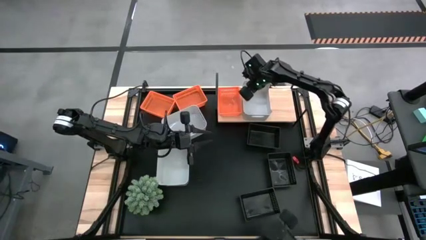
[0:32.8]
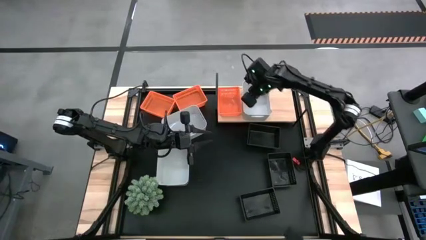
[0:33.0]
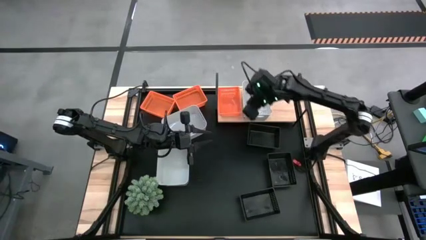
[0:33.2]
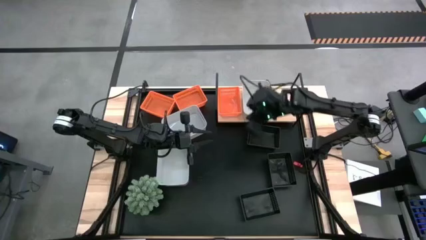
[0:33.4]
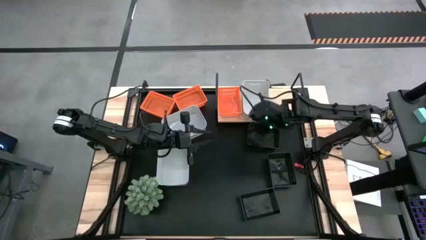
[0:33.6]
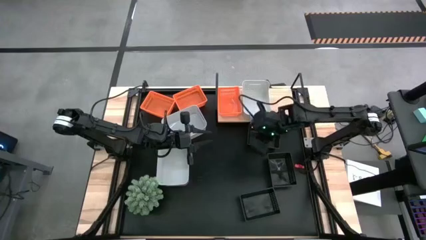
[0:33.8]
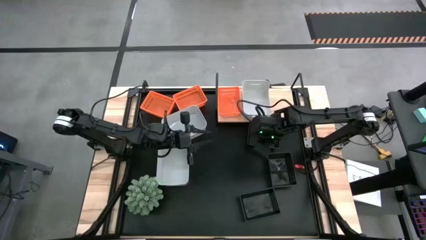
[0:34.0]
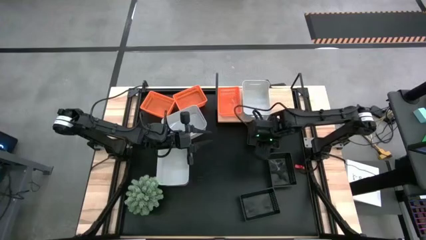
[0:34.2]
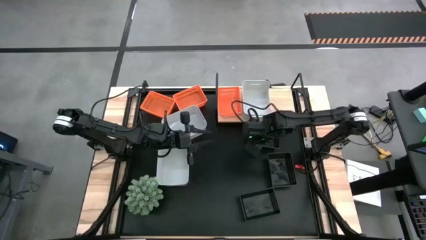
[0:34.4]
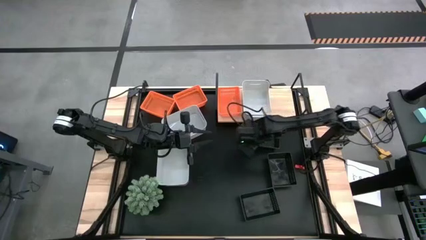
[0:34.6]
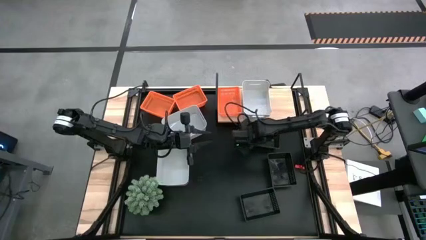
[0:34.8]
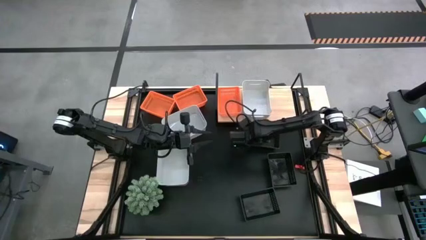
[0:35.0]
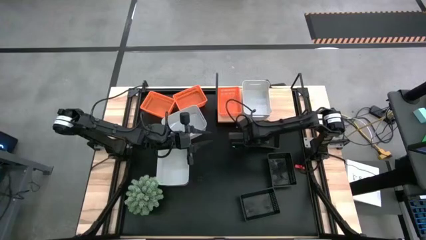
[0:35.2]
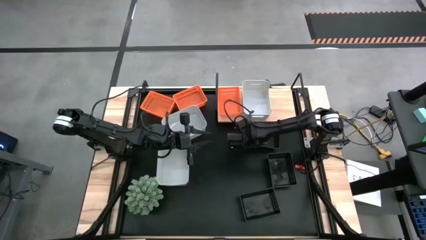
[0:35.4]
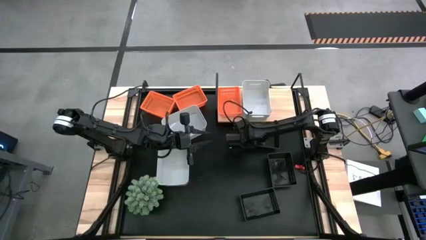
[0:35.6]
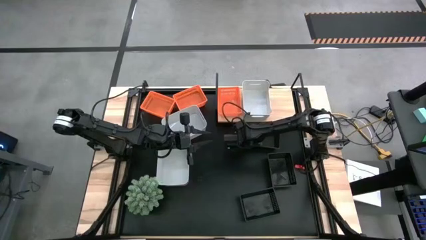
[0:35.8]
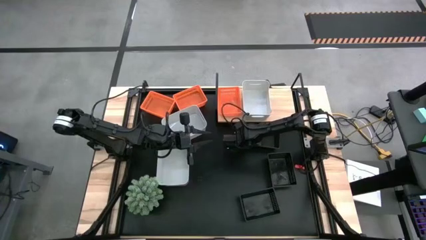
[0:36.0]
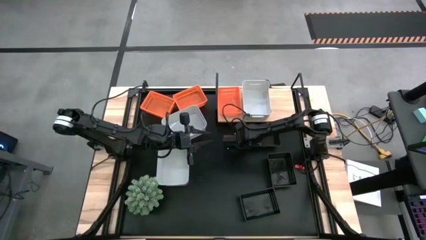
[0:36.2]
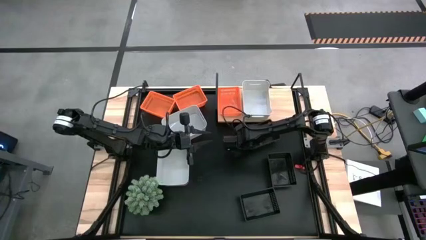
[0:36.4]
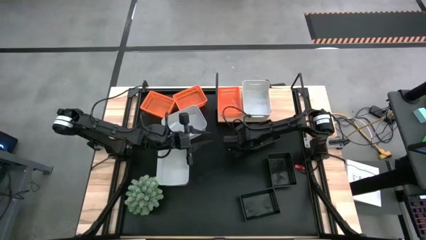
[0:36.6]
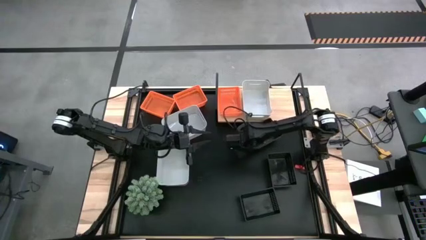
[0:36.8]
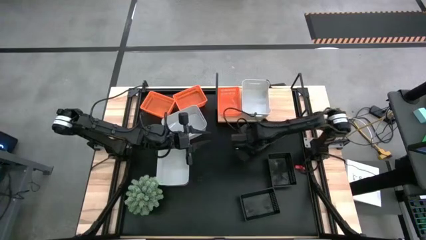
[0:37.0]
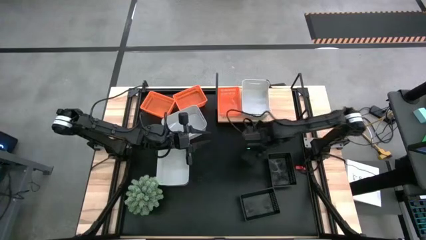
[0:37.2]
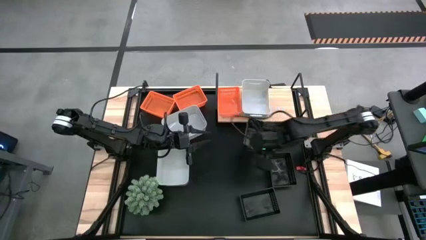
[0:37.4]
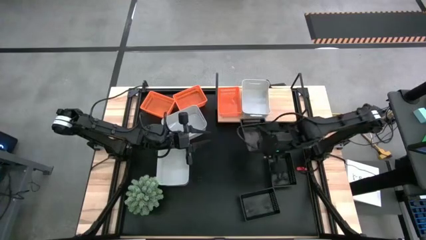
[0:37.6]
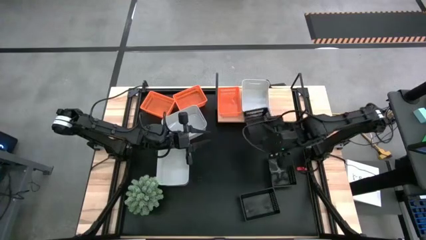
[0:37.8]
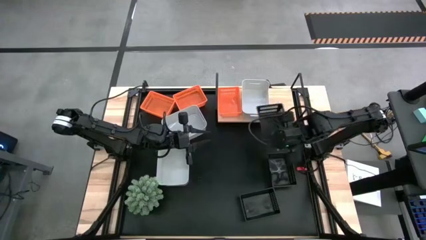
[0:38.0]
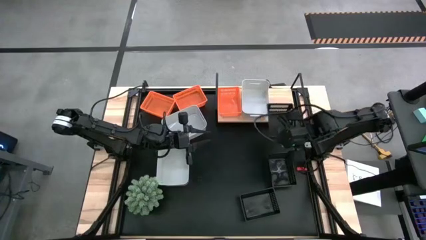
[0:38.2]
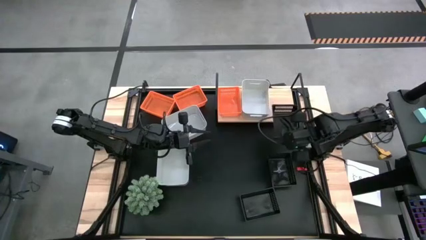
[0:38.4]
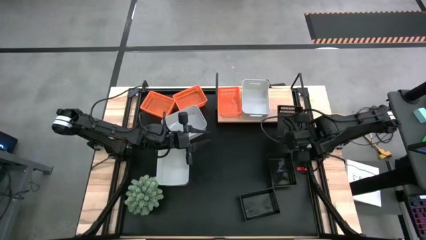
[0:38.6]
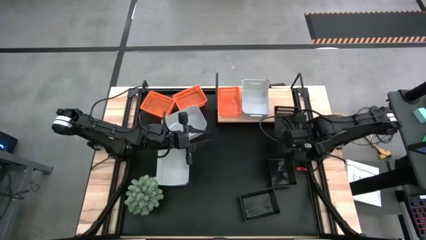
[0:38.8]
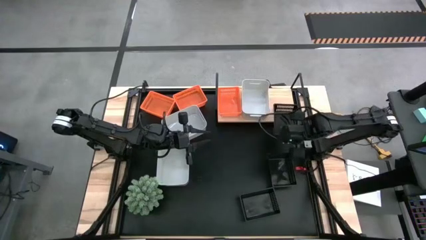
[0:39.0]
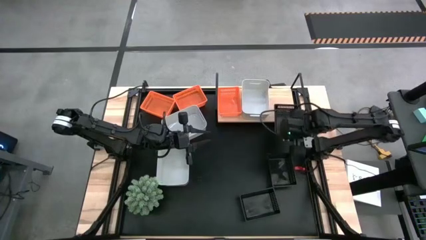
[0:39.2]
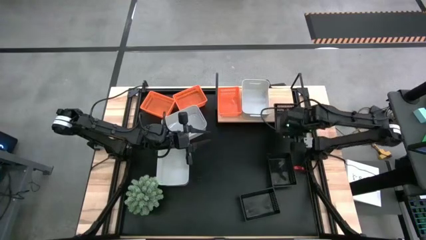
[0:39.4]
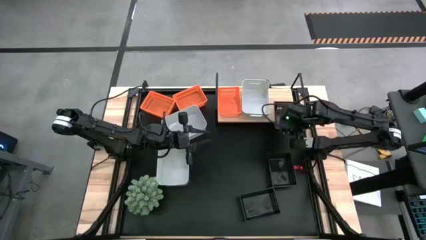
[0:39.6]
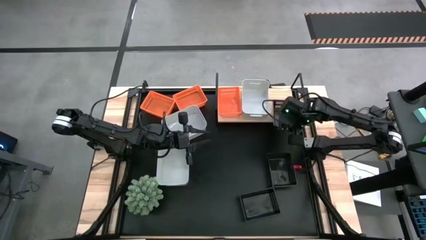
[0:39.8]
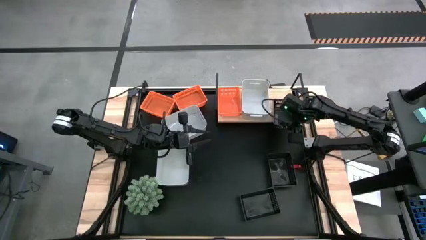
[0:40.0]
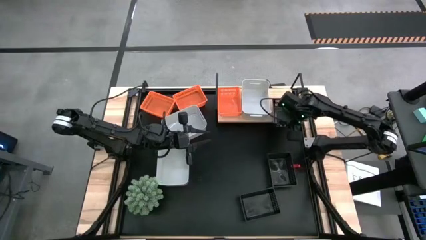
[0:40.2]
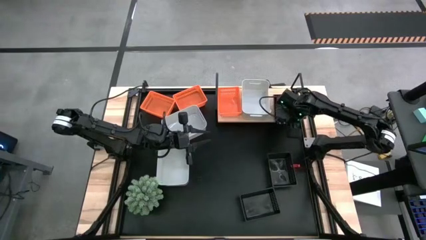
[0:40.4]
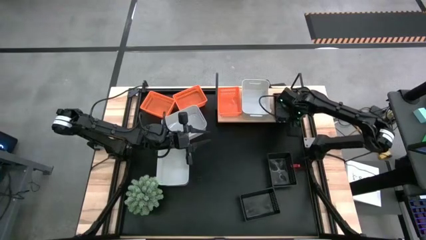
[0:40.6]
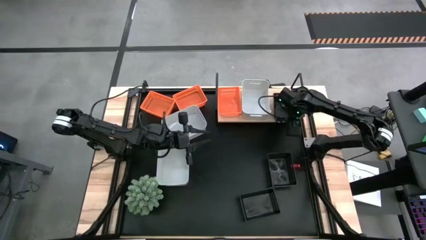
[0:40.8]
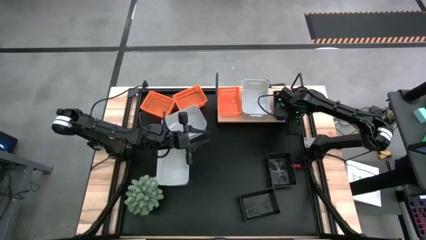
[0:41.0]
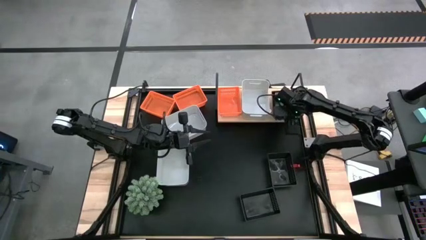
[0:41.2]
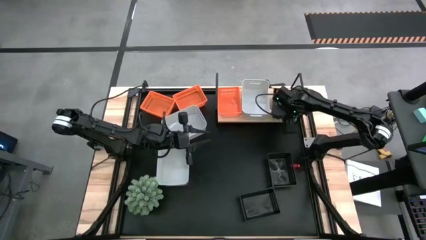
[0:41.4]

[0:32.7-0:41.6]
Task: Stack baskets on shelf by color
Put the top black bin on the shelf
